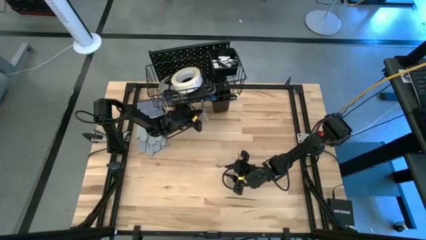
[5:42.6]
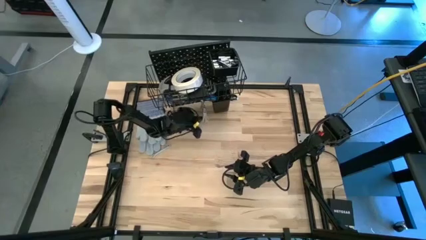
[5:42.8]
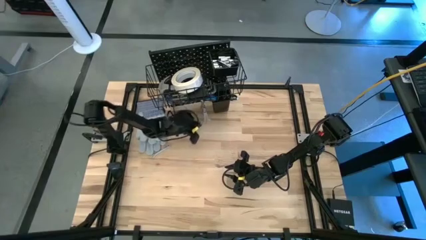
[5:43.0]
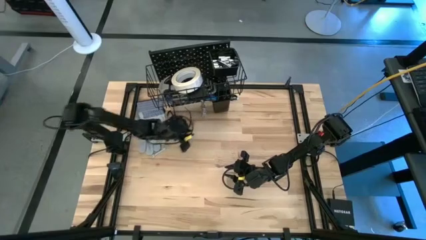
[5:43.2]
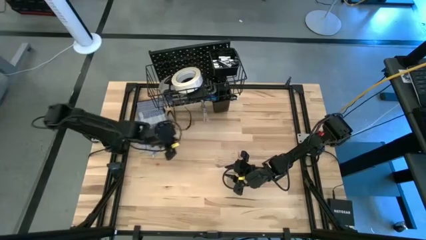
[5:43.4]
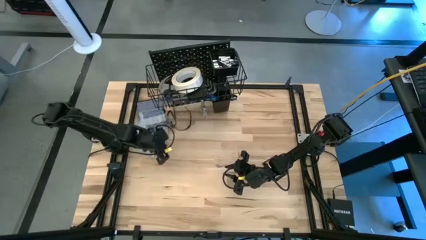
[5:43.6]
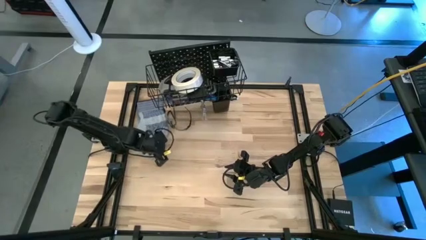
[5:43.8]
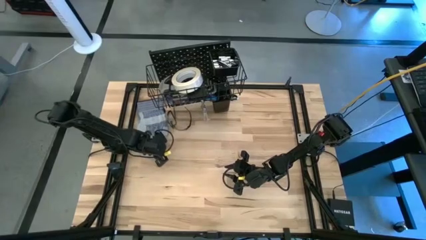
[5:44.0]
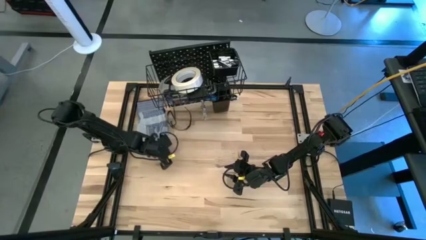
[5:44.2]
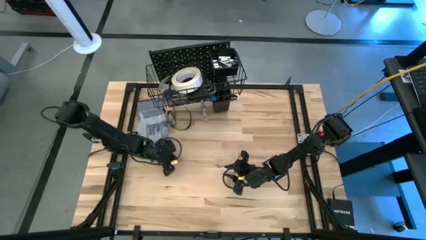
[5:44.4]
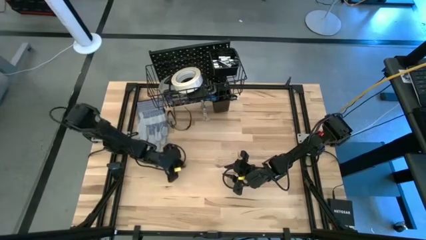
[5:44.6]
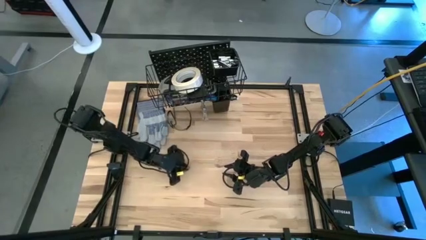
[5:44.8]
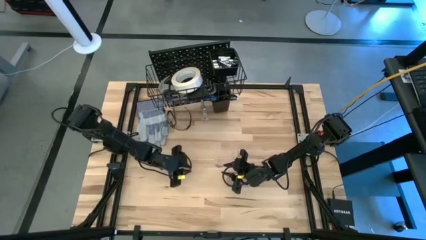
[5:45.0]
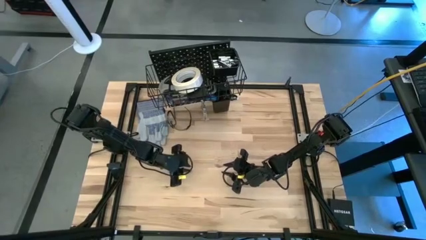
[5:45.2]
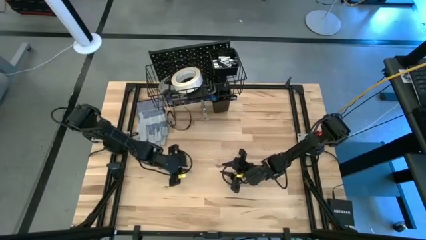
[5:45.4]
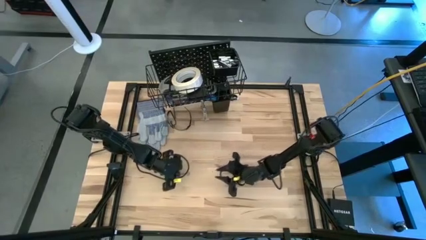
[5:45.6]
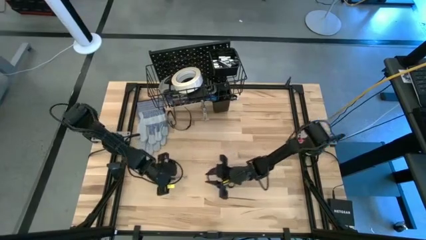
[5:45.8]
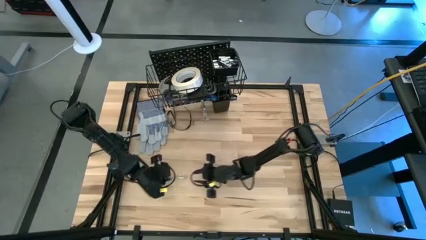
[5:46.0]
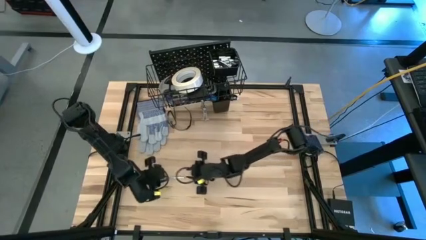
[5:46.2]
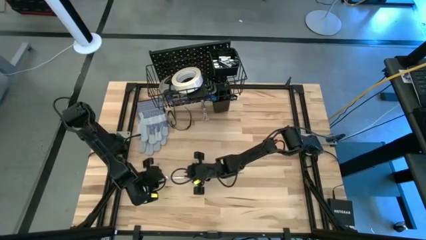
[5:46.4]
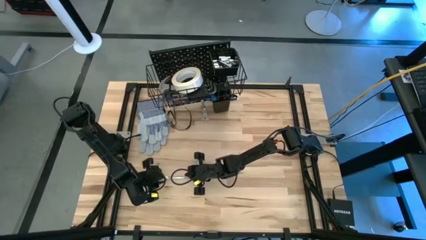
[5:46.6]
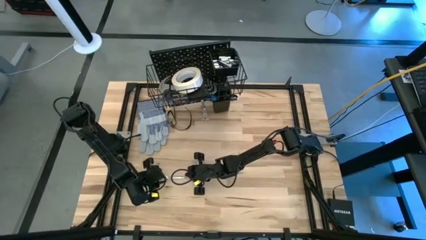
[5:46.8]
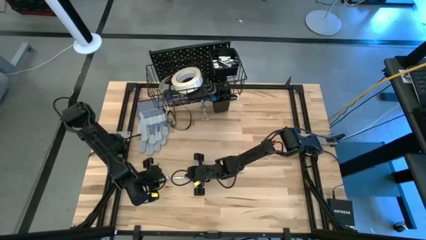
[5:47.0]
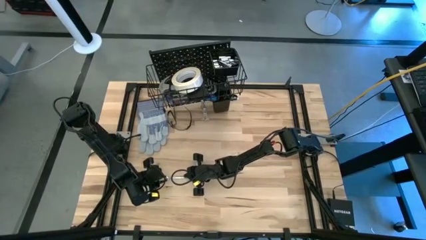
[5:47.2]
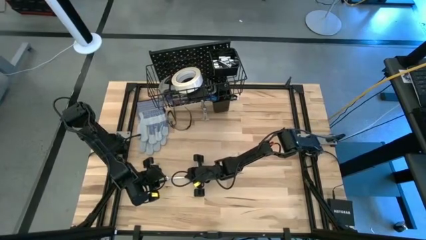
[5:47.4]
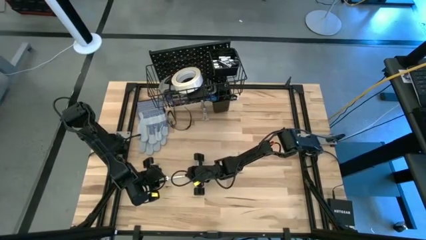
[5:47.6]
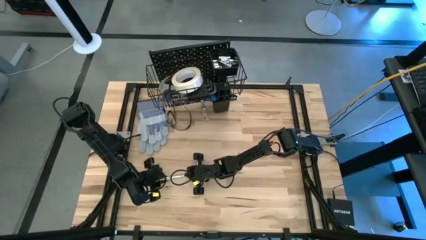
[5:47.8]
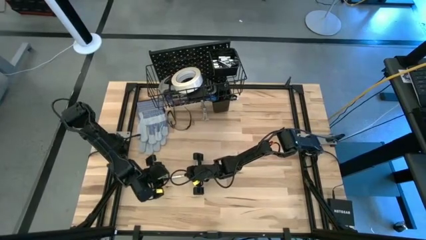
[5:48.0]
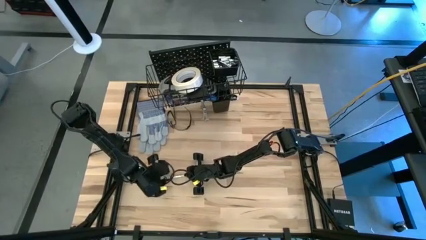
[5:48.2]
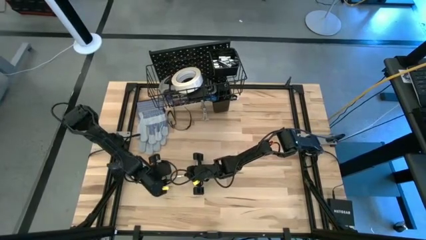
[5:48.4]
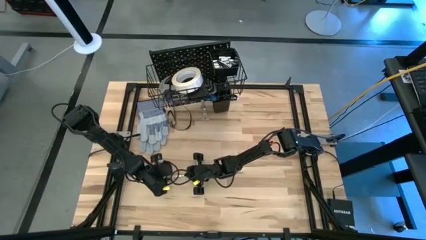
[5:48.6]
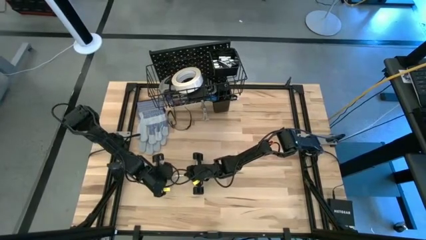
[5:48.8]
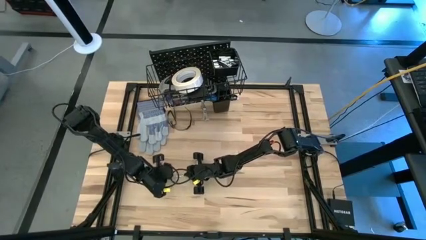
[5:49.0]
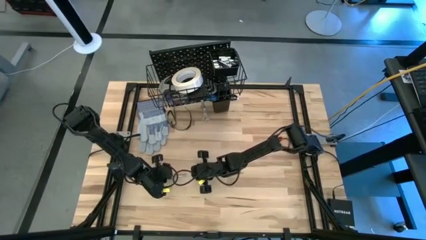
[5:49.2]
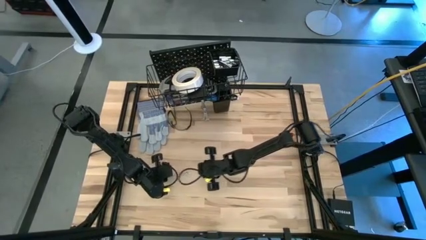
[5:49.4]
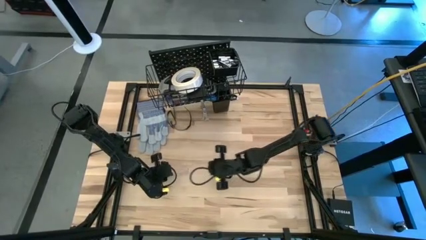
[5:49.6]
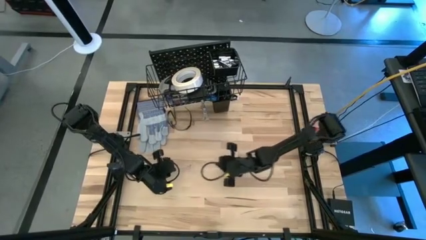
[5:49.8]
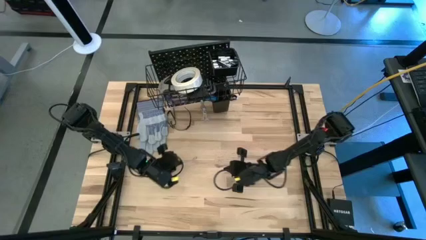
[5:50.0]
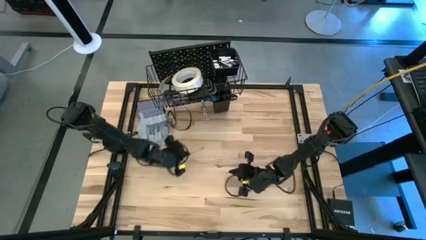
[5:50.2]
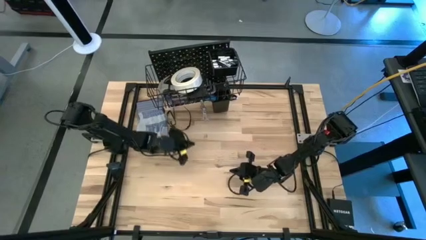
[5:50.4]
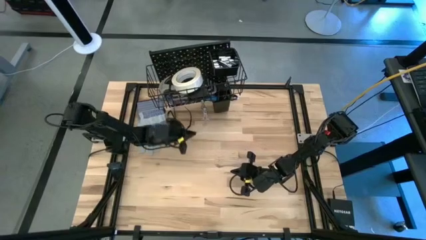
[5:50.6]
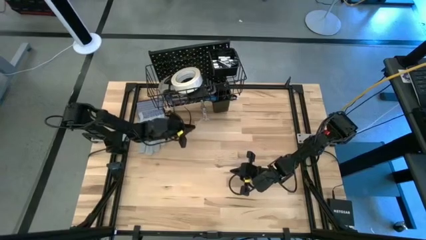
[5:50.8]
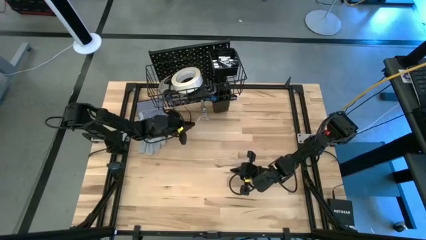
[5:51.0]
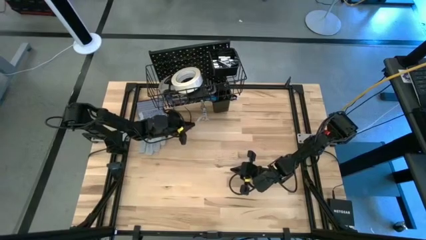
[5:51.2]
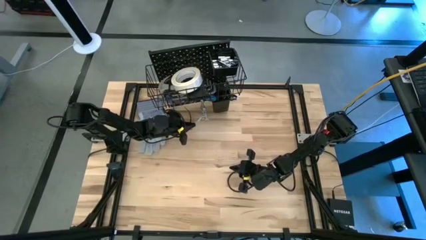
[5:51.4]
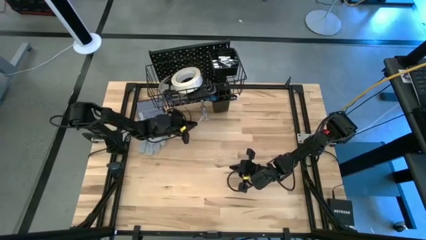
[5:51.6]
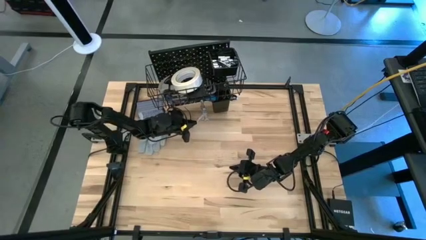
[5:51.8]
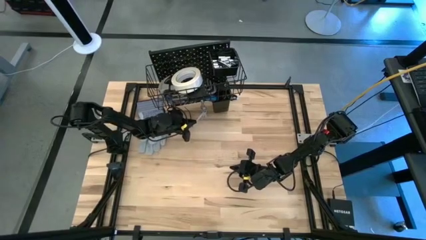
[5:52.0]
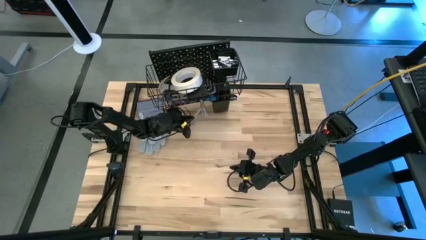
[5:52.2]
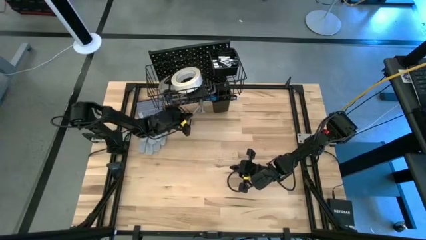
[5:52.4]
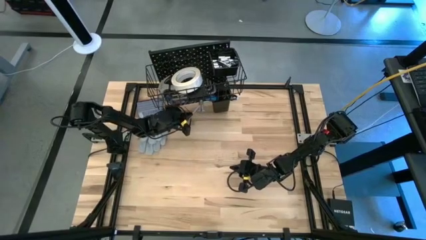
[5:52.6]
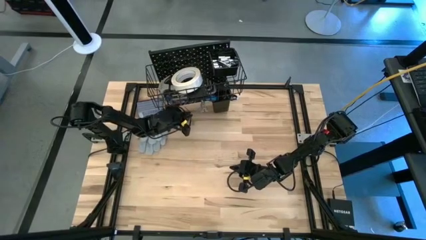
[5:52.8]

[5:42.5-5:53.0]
Task: Hang tools onto peg board
Hang the wrench on the pegboard

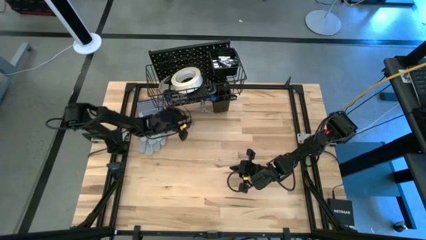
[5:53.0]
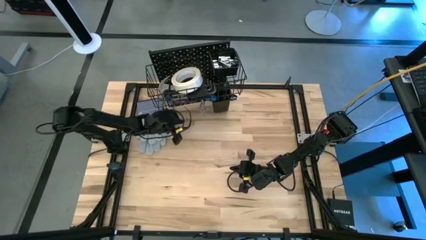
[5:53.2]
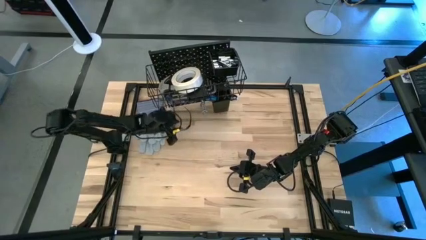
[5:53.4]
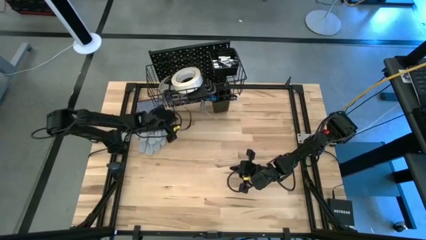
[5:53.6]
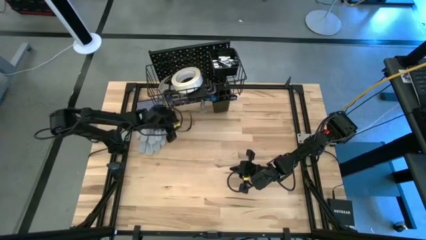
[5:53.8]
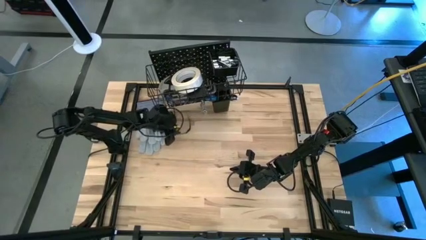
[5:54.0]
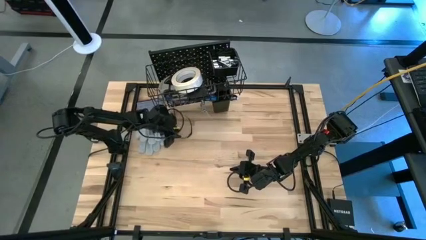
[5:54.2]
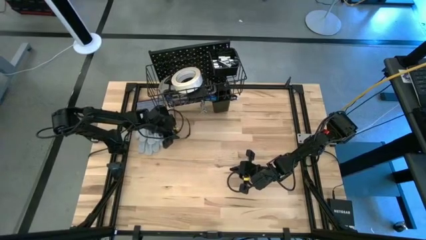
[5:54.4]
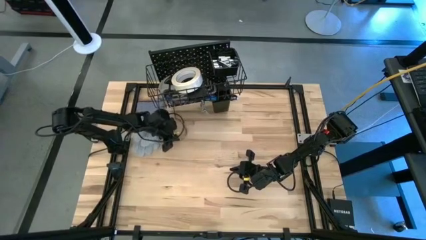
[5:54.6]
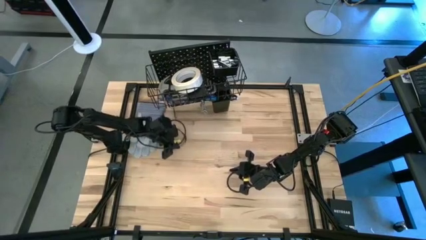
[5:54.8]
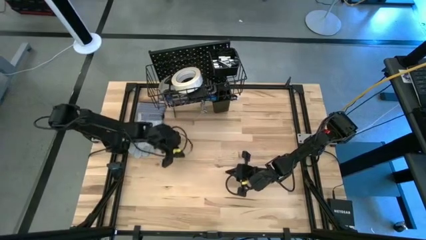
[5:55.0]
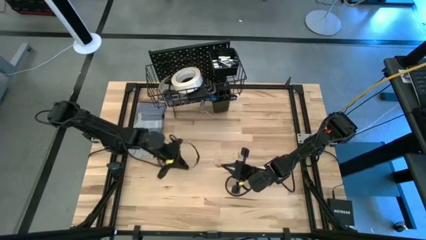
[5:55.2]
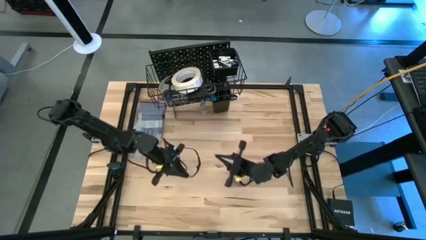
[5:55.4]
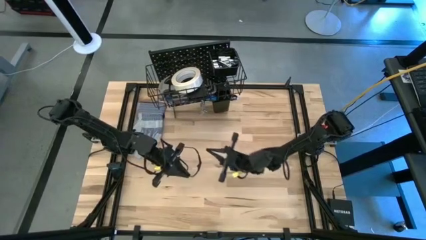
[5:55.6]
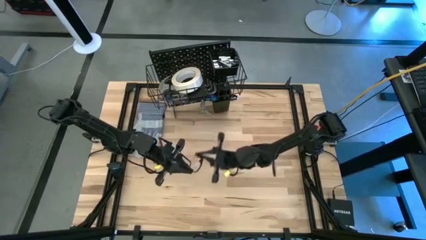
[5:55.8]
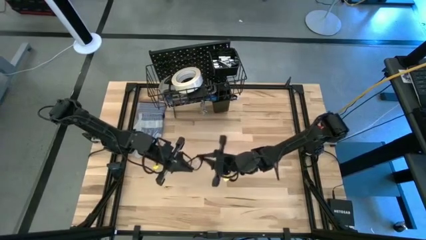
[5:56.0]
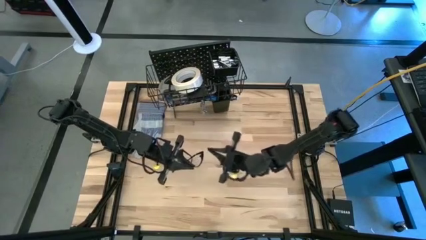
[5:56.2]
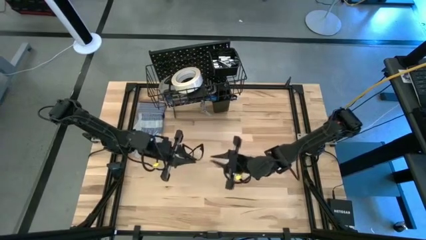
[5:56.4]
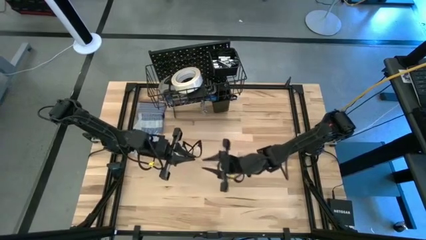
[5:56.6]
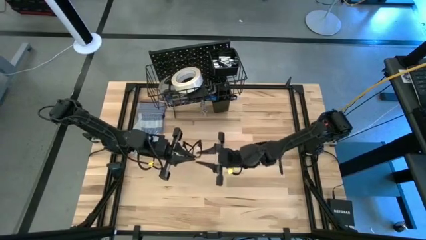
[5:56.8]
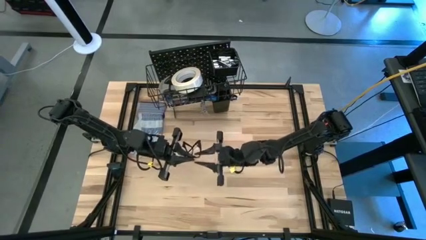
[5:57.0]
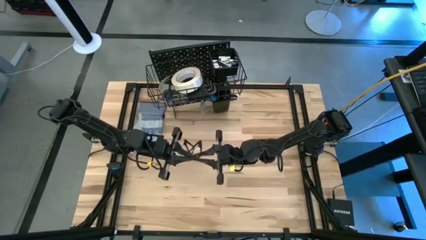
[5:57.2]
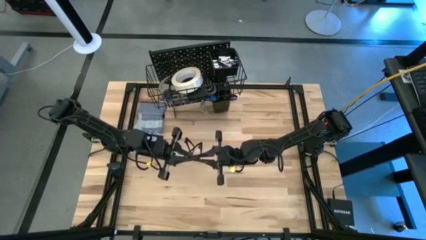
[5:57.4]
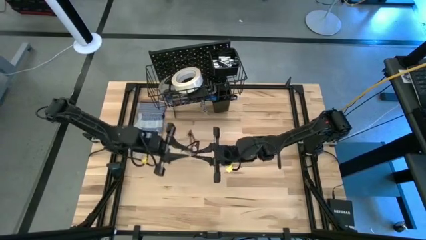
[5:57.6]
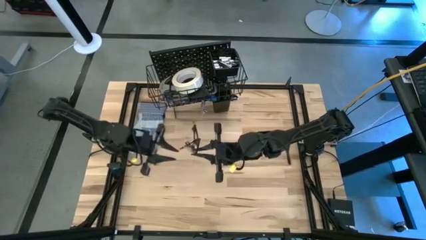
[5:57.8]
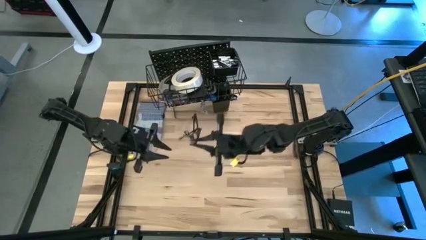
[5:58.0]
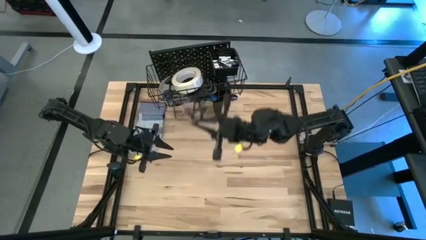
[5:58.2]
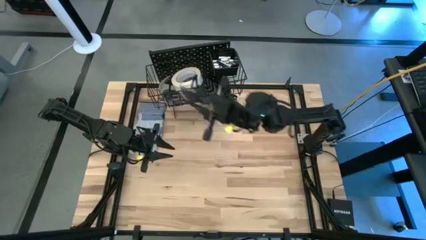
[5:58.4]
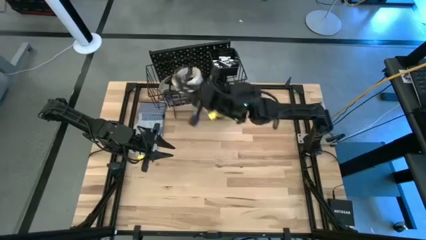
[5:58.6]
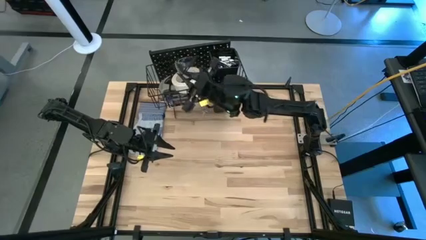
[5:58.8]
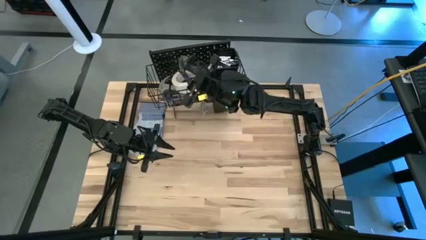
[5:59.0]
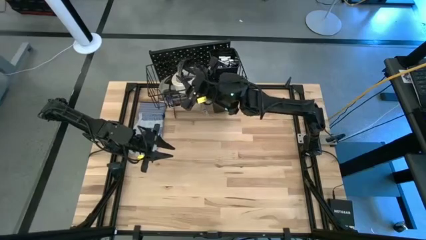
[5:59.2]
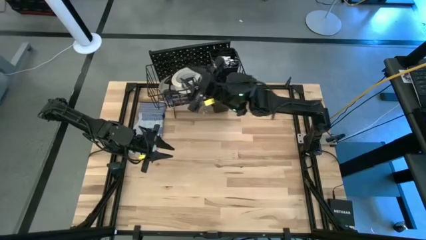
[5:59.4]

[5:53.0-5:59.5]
Put the safety goggles into the wire basket on the pegboard
